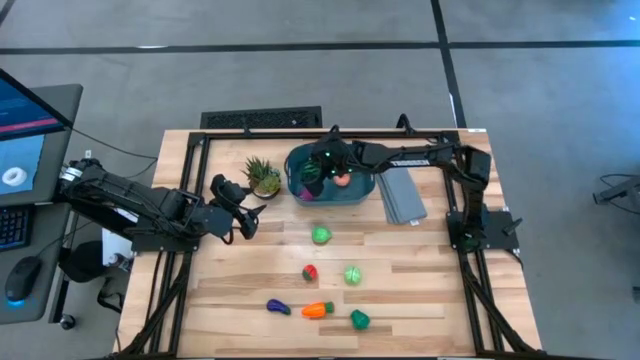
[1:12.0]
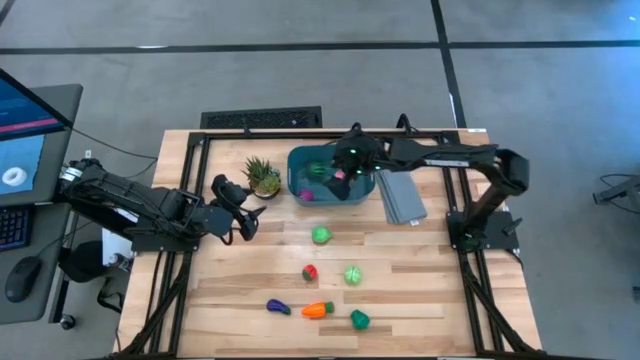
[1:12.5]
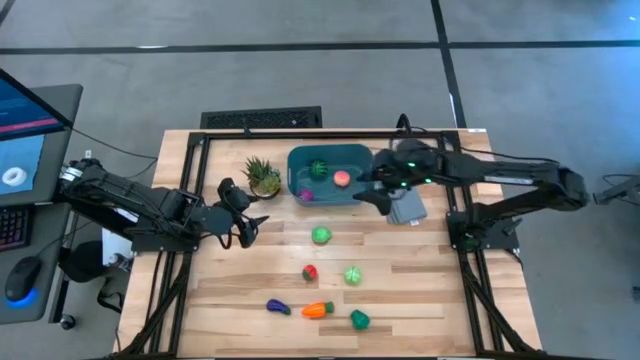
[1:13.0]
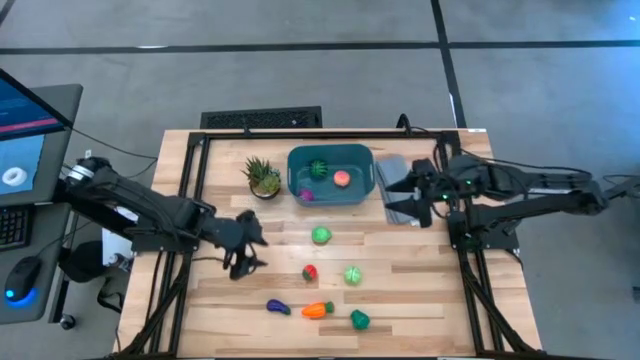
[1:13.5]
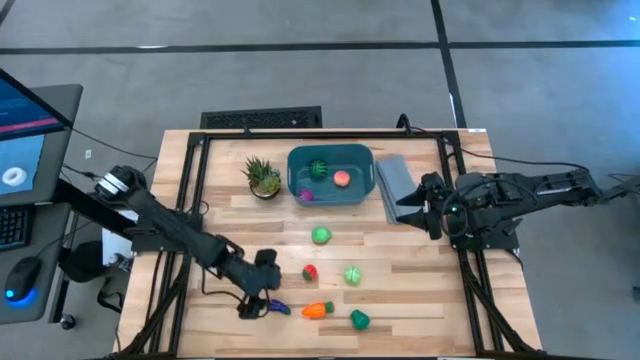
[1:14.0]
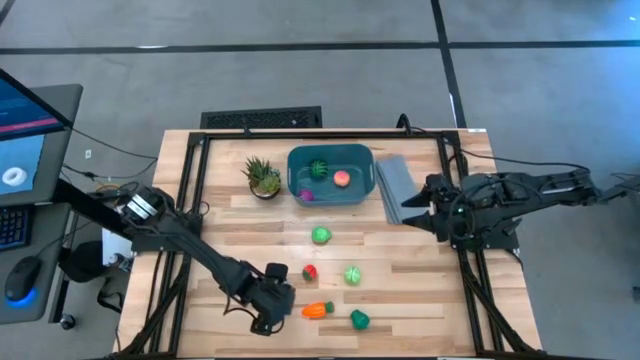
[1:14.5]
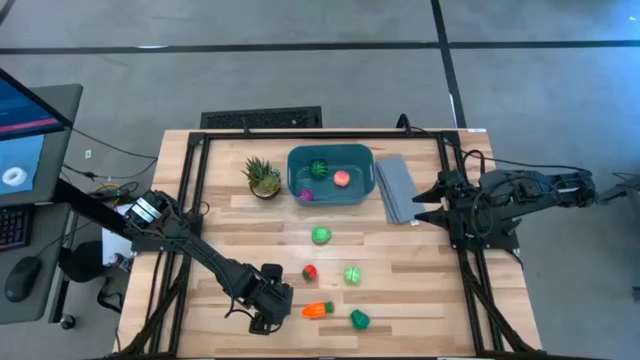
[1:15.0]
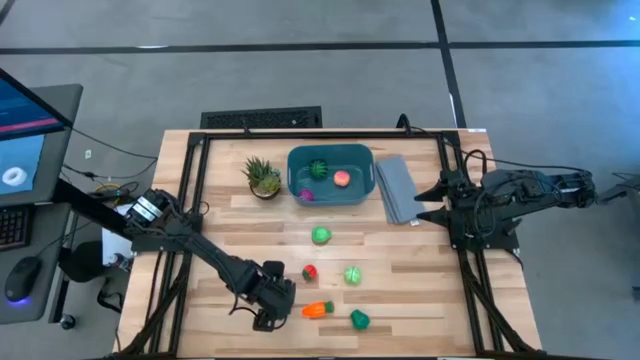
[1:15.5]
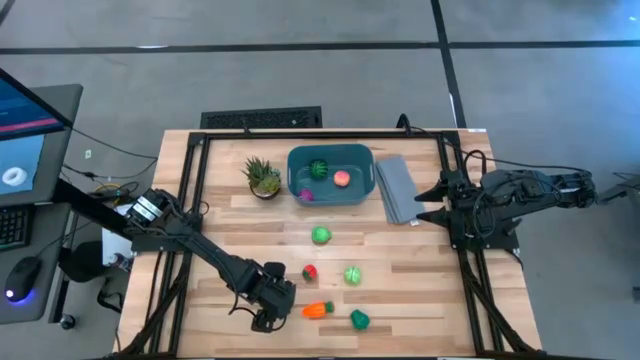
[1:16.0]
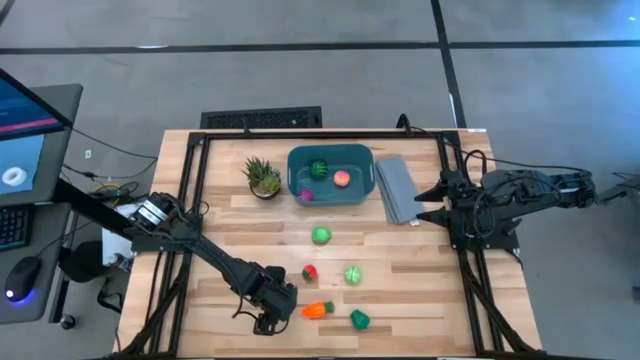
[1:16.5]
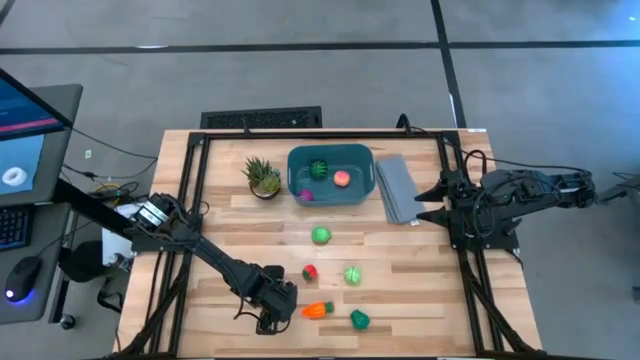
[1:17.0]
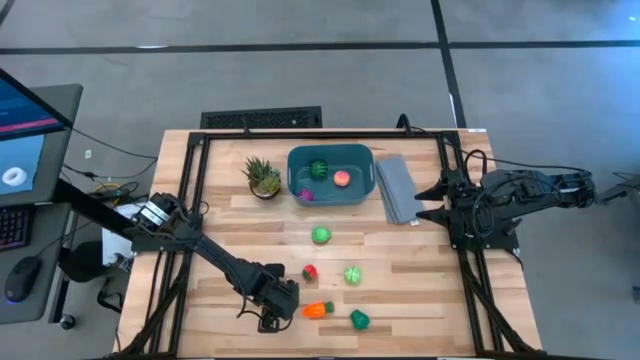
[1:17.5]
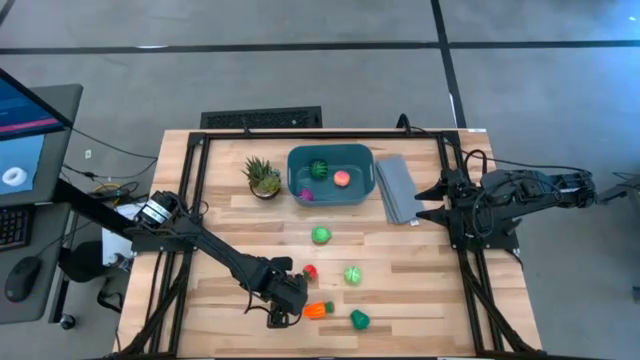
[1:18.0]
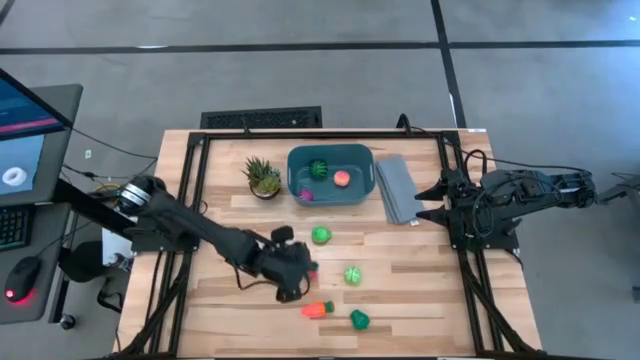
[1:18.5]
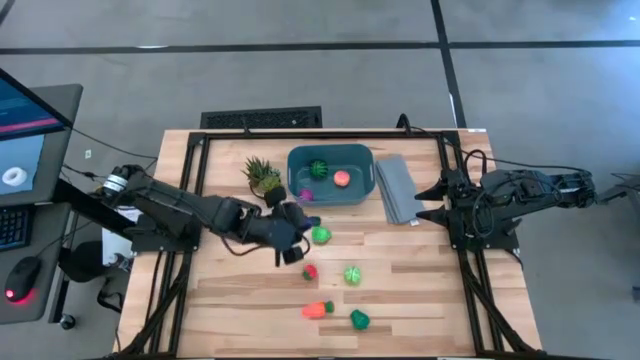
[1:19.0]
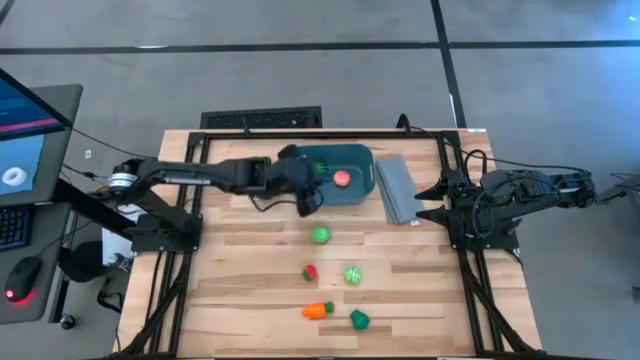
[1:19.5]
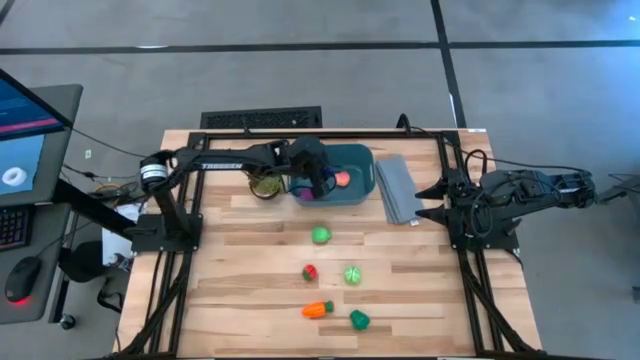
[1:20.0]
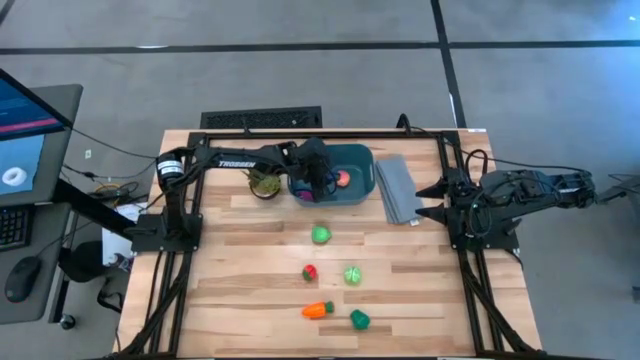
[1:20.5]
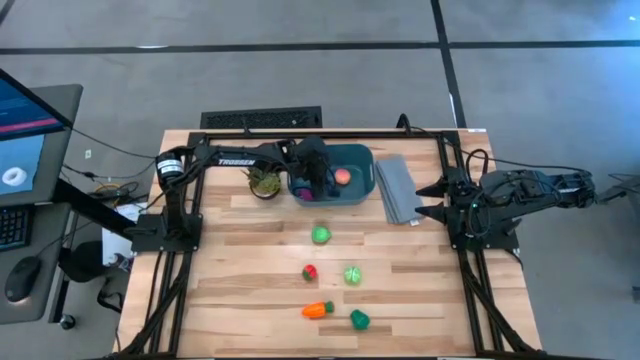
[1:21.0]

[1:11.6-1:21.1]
Task: Pick and placing Produce into tupperware
Put the eggplant into the blue bin

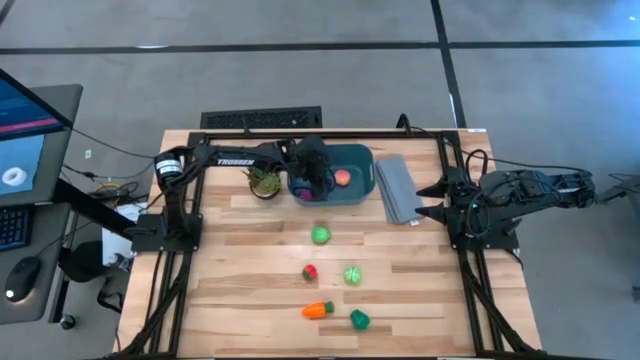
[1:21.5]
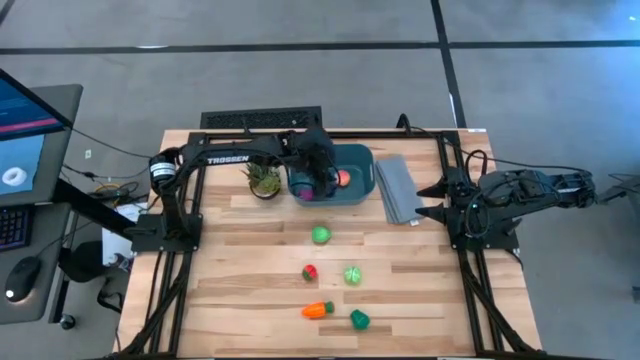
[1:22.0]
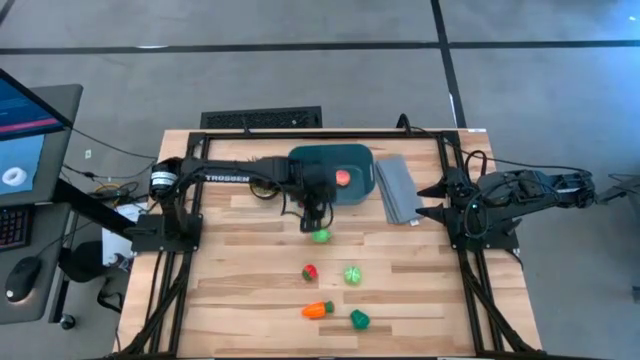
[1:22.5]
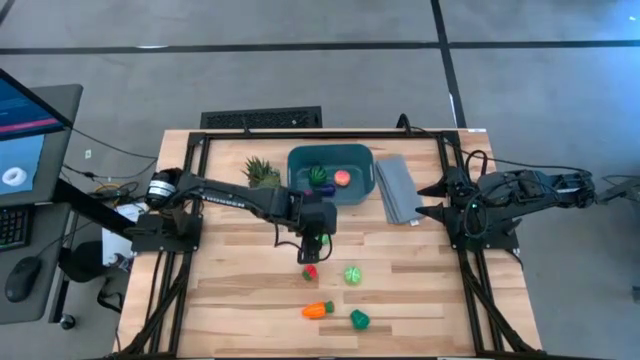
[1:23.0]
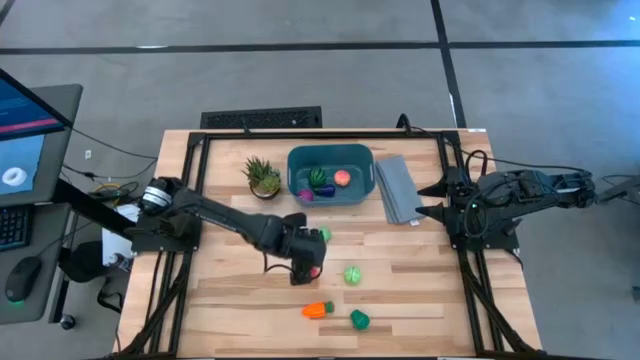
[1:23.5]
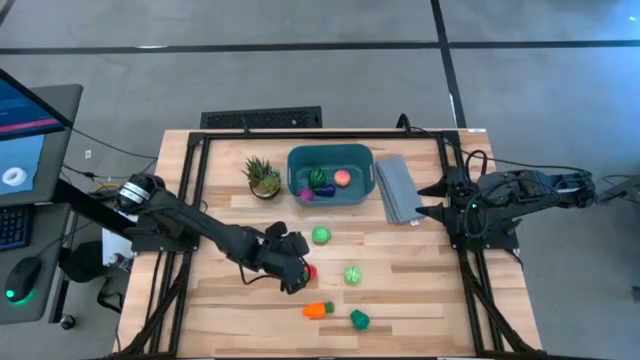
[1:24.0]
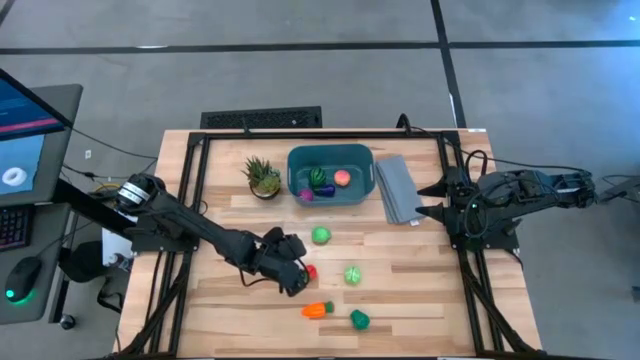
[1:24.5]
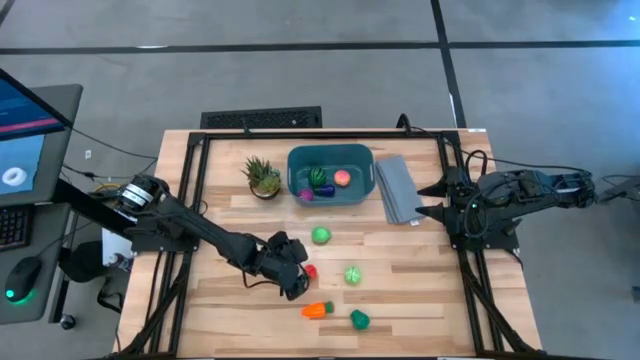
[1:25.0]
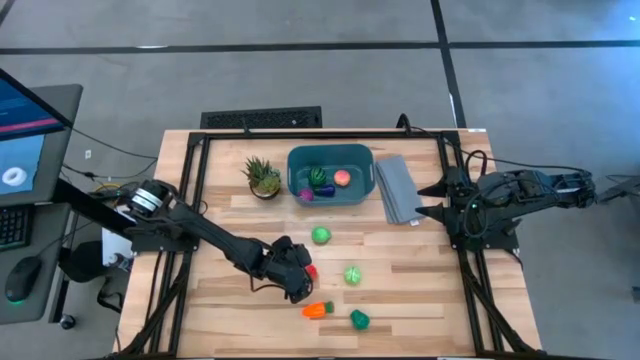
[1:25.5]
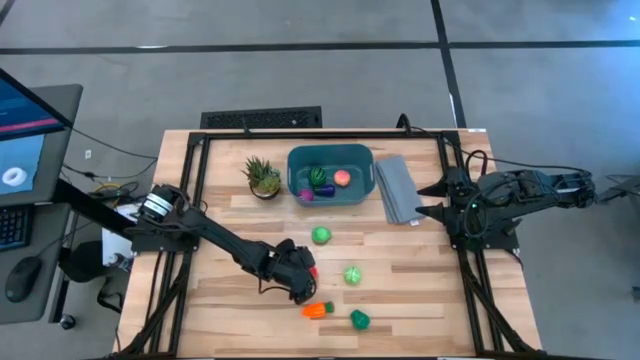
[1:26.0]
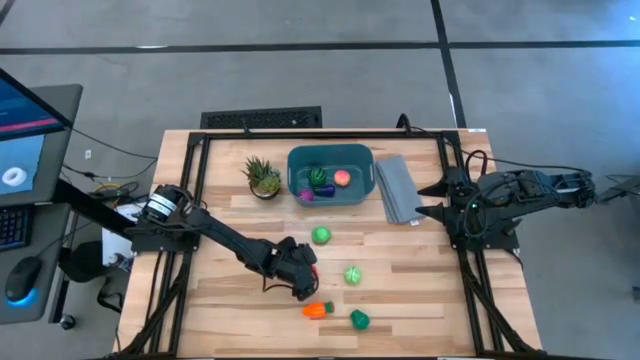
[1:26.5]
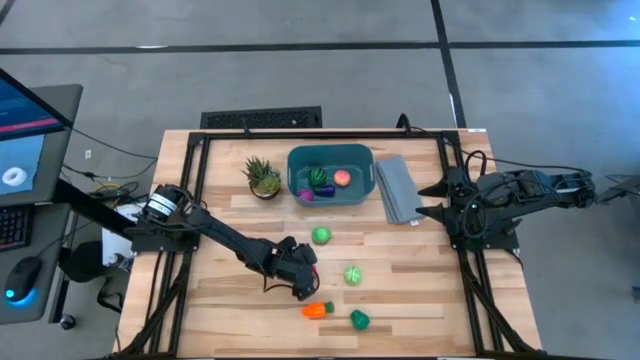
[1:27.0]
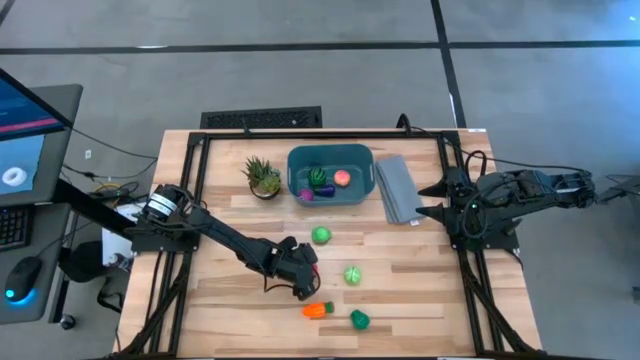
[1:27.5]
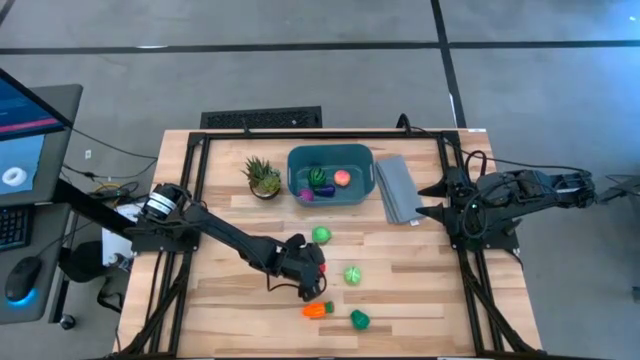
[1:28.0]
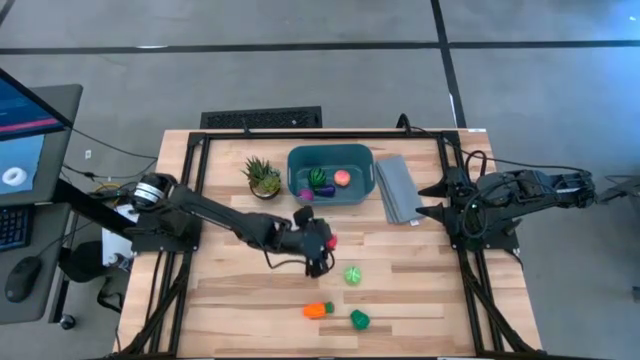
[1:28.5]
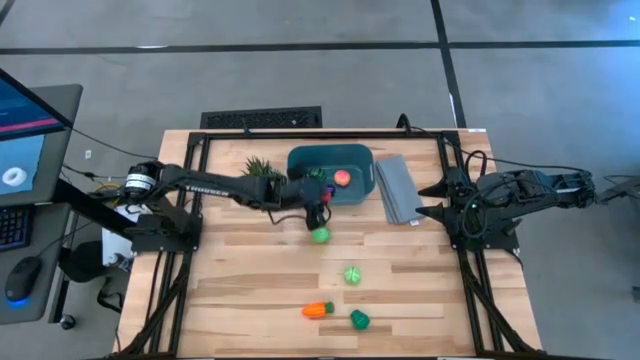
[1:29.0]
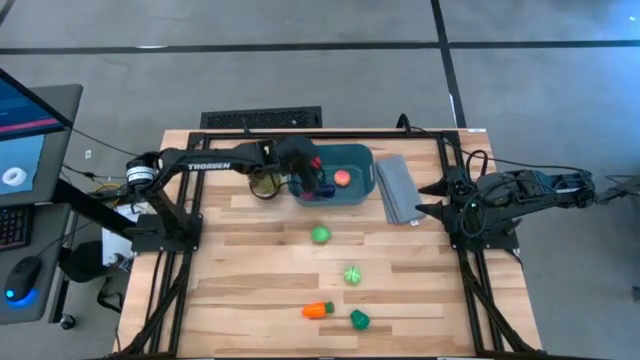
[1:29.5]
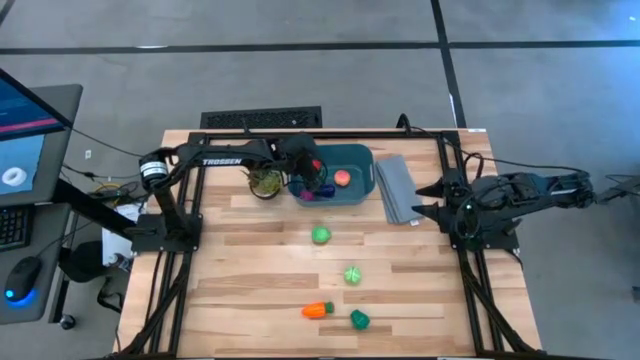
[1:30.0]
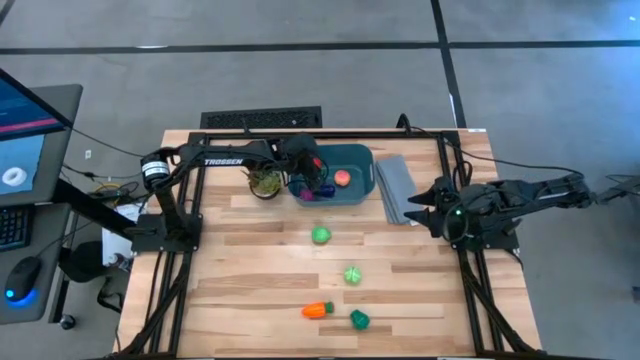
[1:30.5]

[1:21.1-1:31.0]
Put the strawberry into the blue bin
